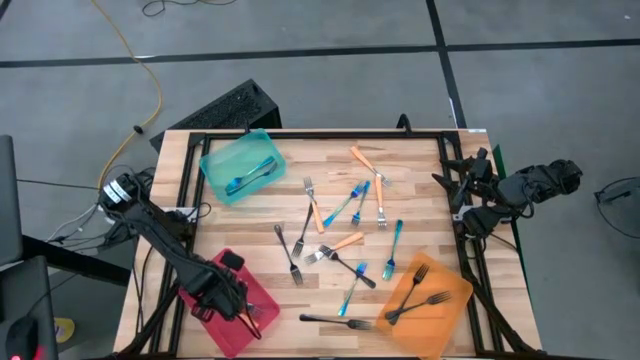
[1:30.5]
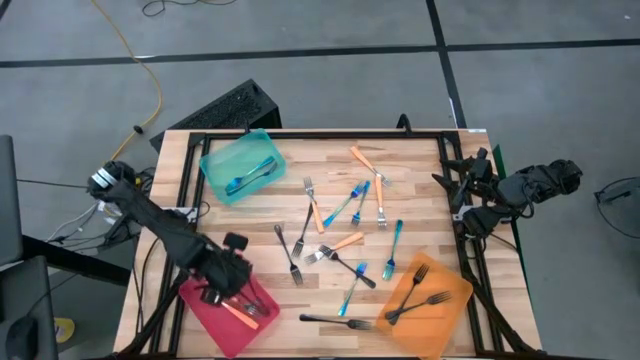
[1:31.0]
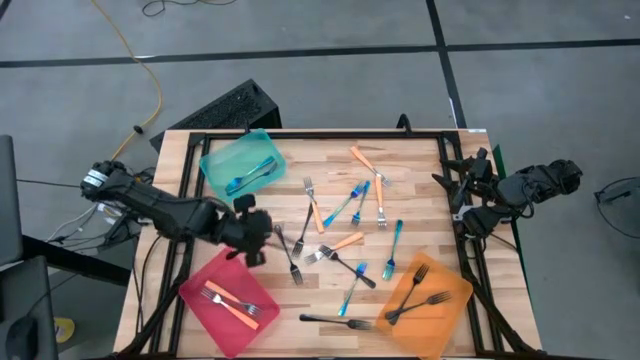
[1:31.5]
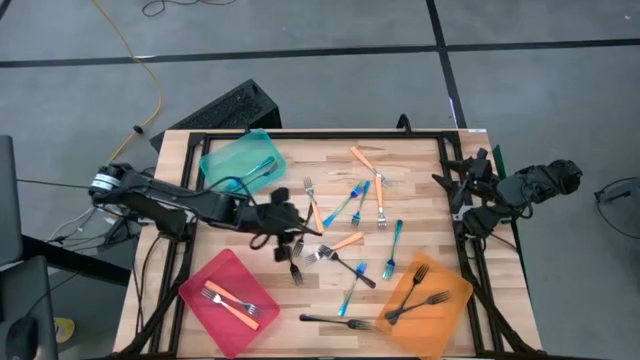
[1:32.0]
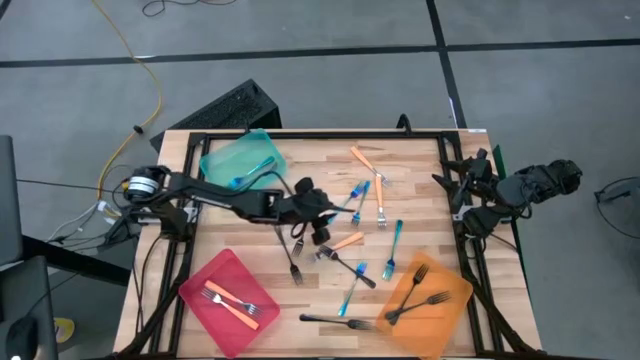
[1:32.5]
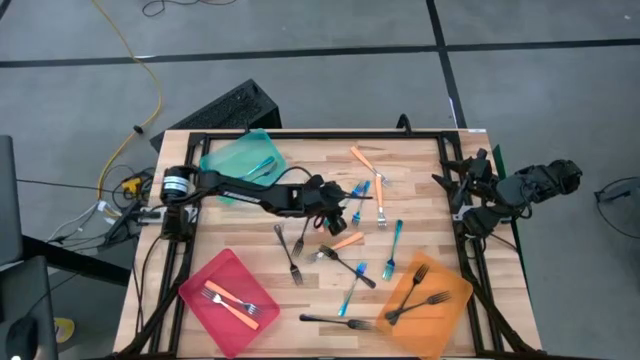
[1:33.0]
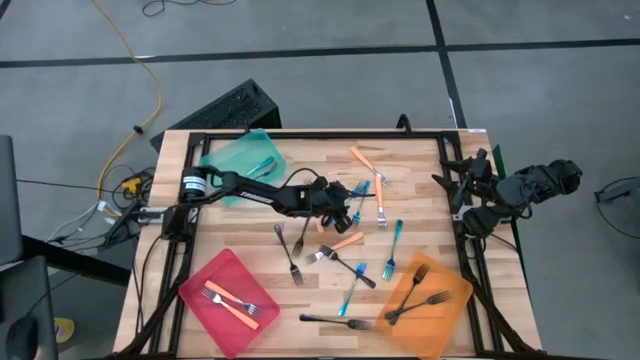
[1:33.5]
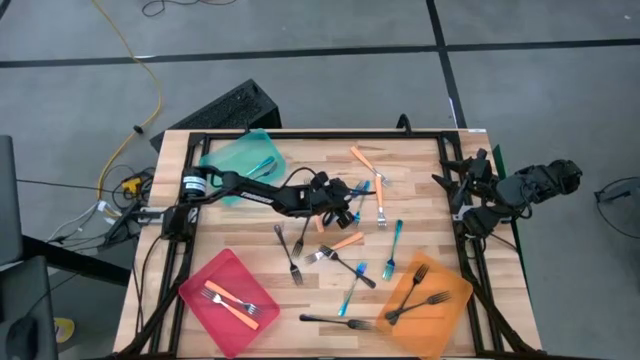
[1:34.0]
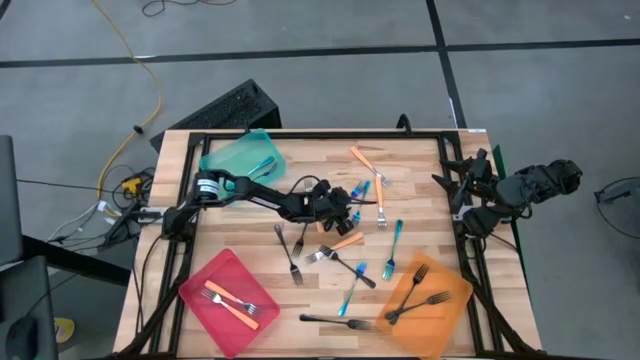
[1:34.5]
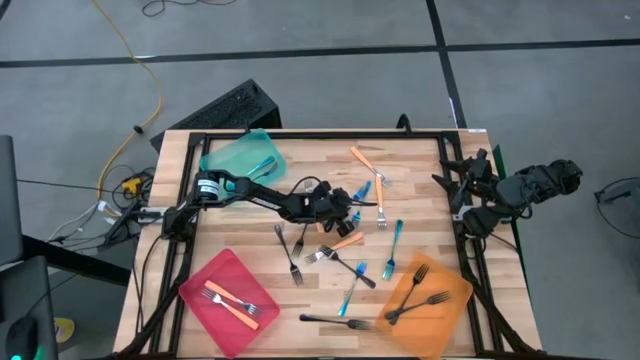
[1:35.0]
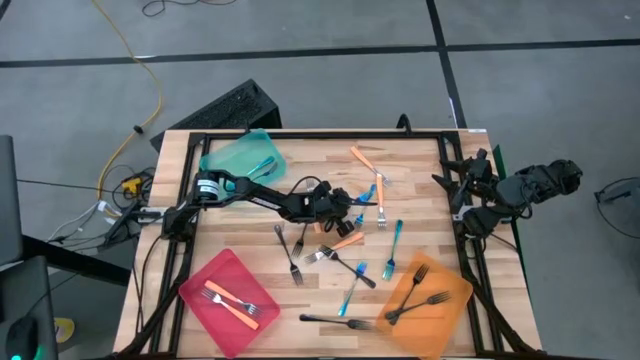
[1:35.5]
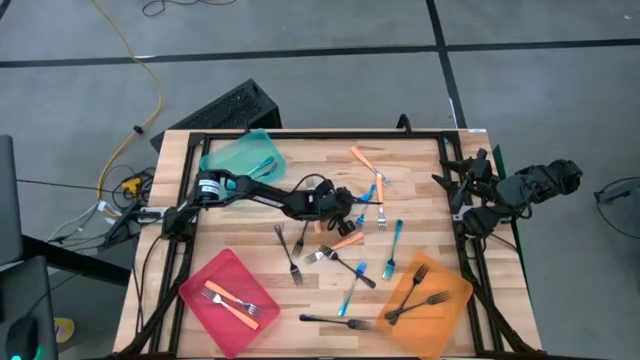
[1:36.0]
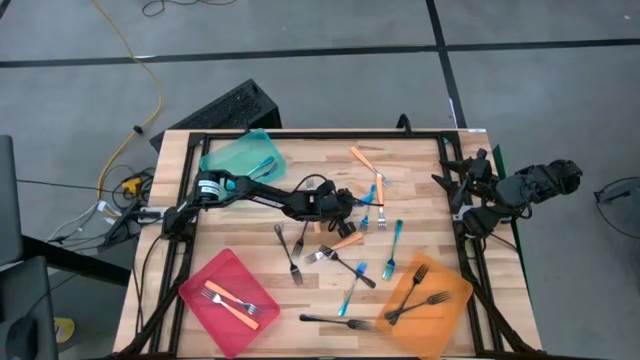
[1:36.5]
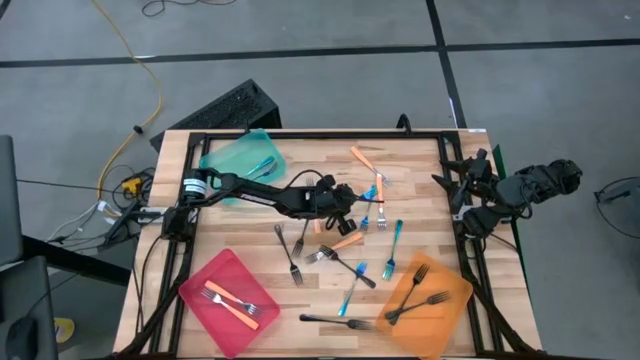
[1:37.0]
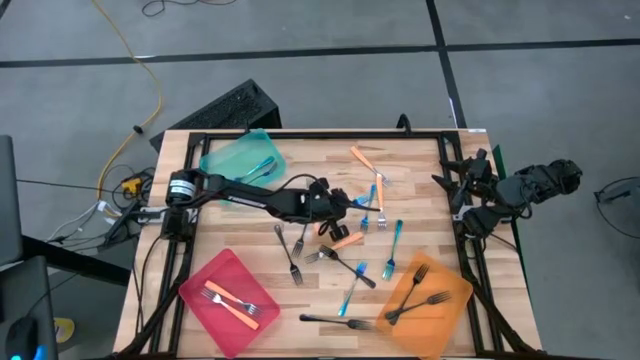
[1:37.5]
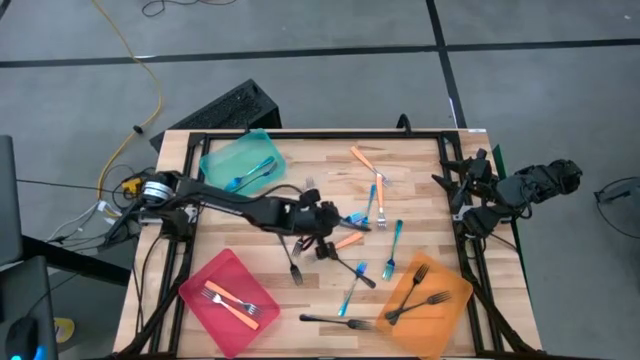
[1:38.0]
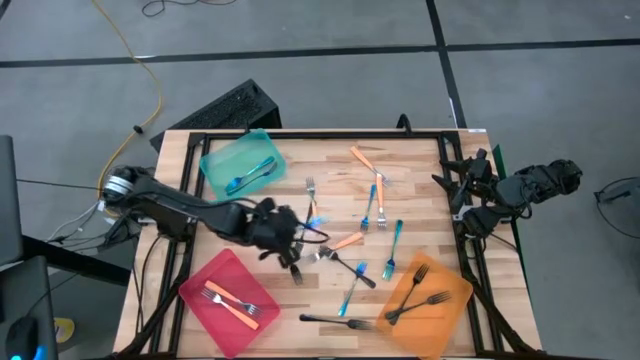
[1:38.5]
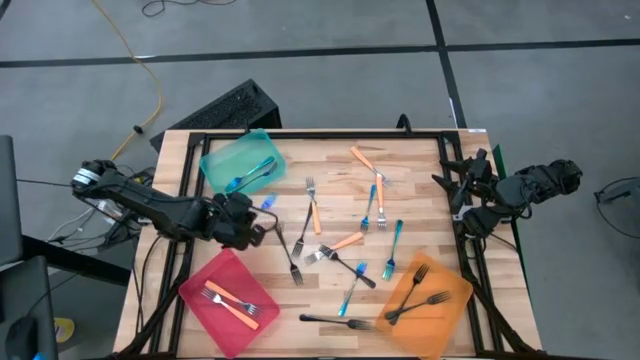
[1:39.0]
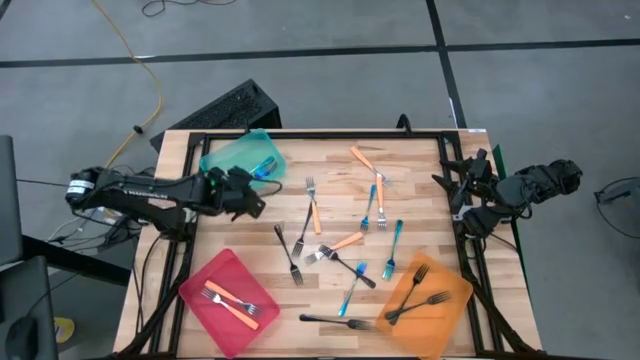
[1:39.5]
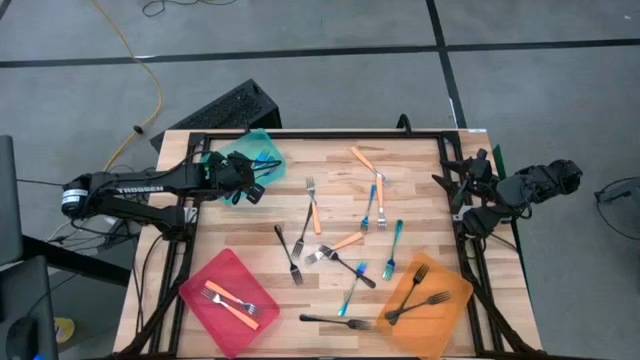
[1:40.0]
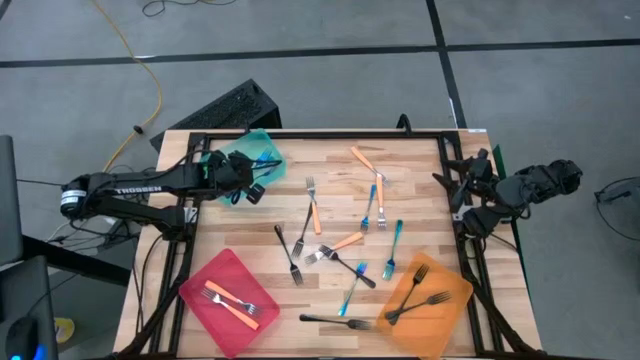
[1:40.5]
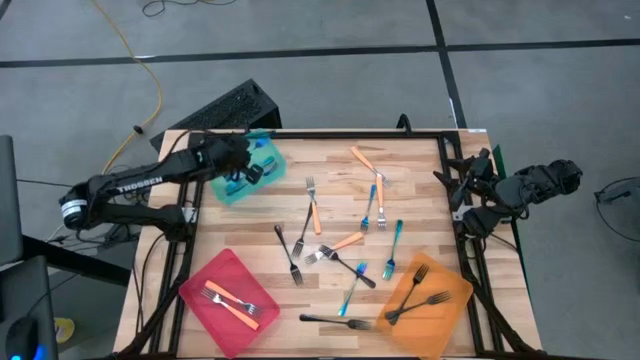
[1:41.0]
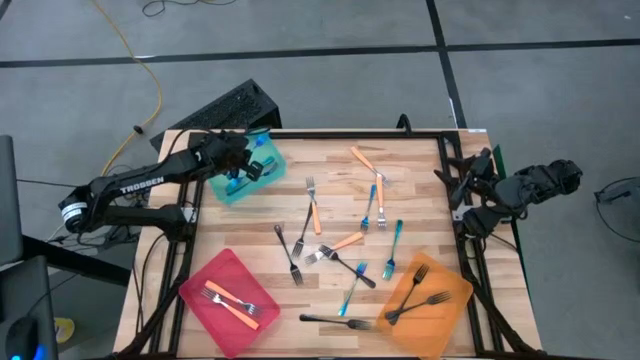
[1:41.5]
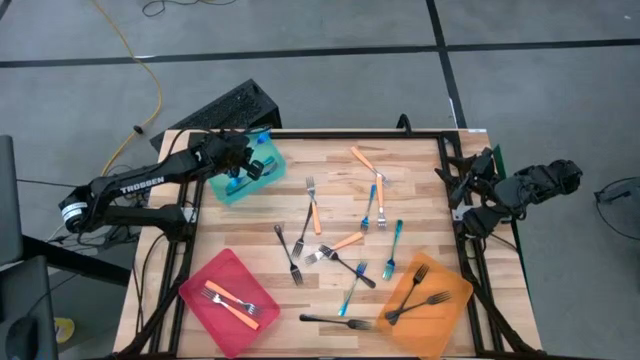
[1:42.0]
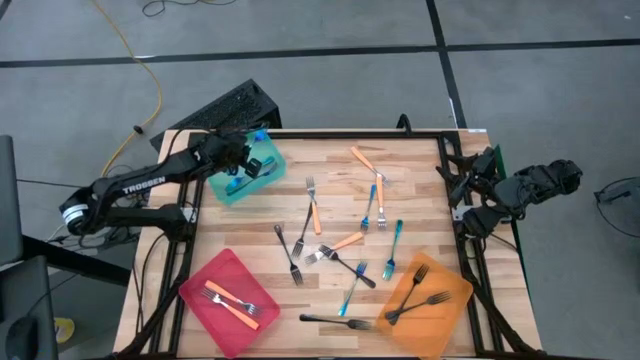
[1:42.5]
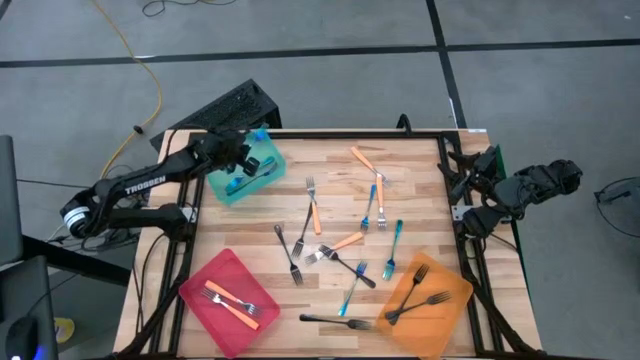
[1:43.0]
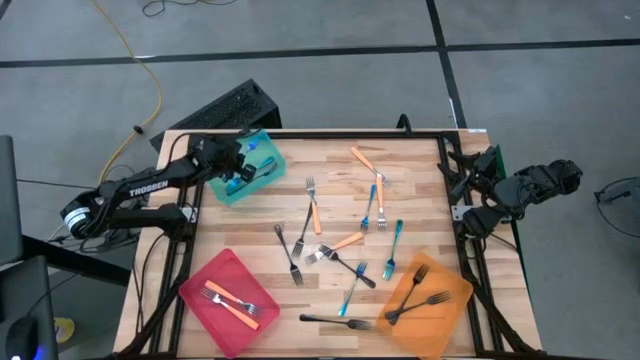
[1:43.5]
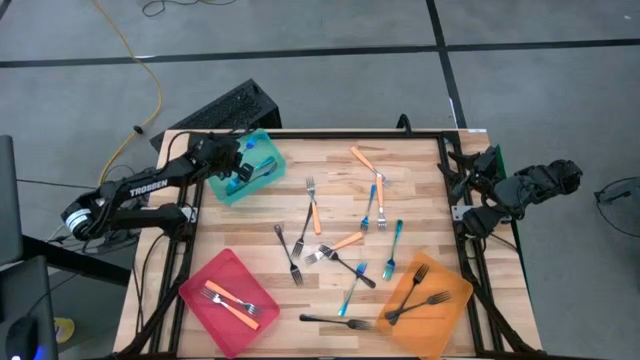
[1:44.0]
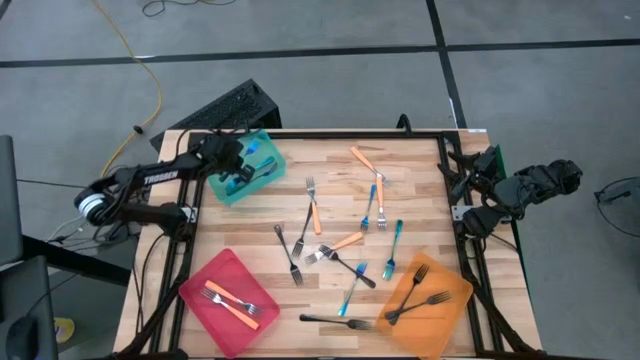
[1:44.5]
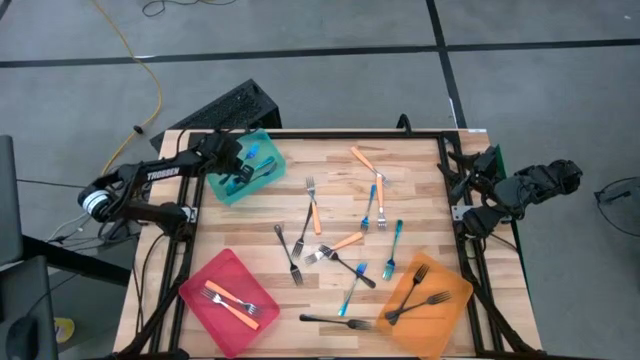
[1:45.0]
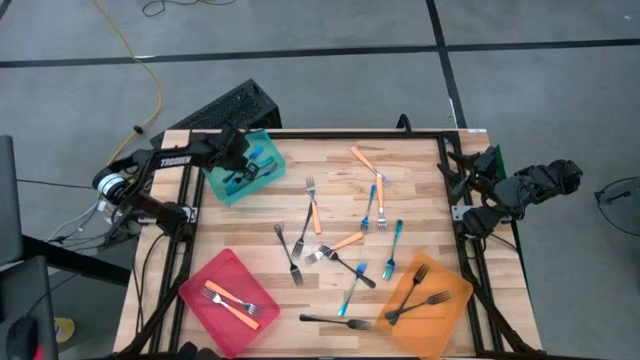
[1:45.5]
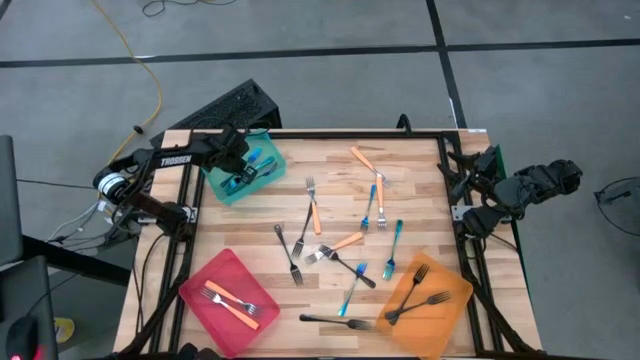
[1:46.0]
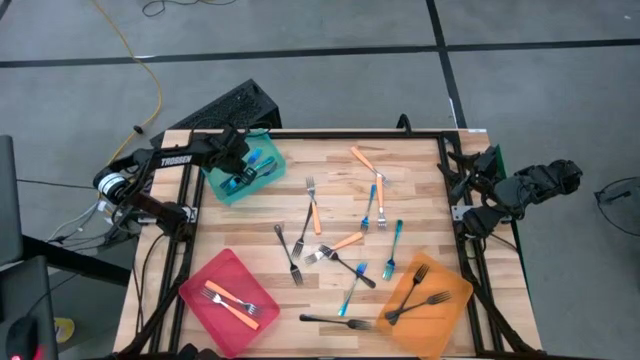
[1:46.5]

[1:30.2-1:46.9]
Task: Sort silverware by color (type)
Put the blue fork into the blue bin

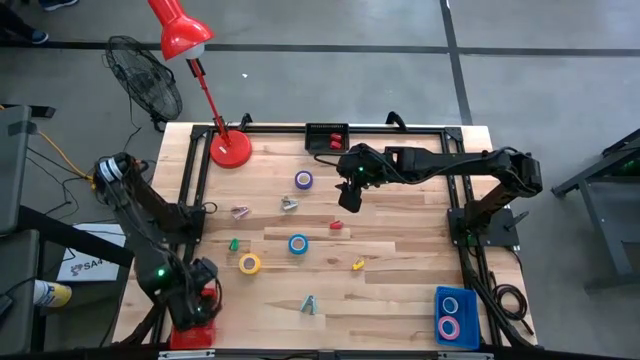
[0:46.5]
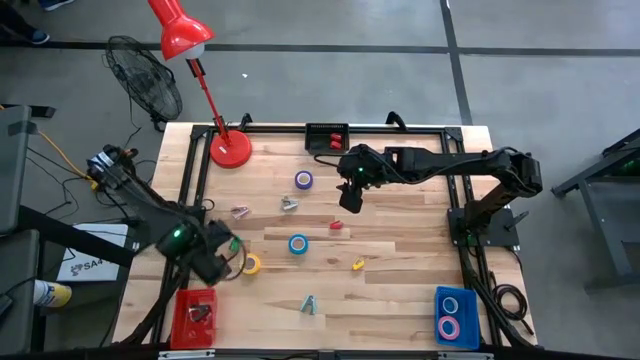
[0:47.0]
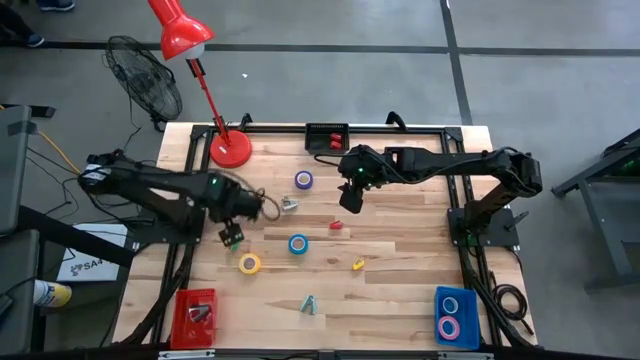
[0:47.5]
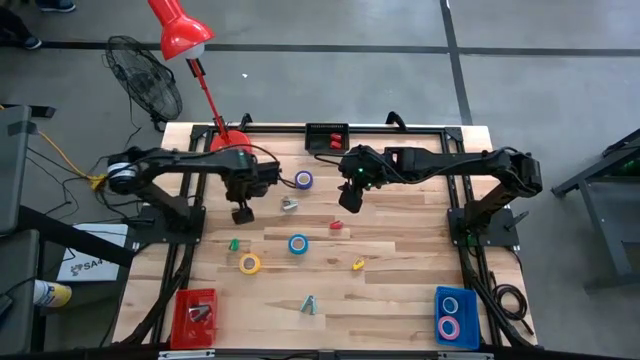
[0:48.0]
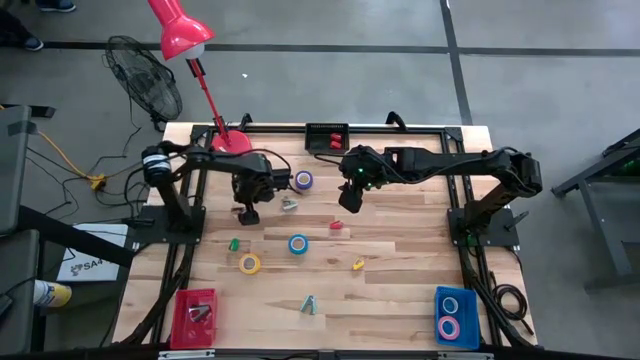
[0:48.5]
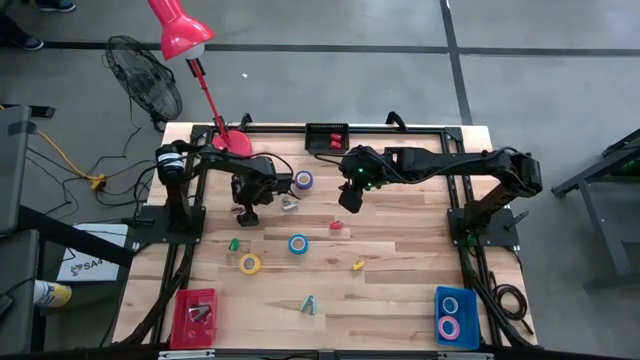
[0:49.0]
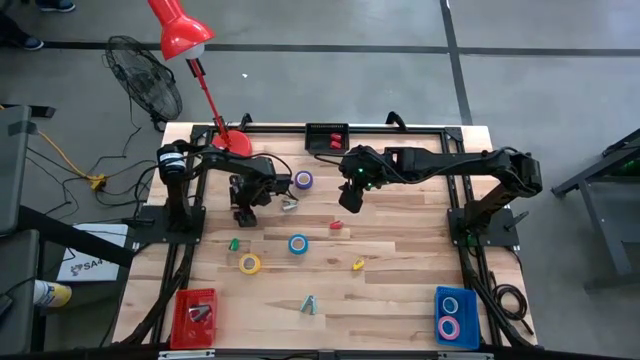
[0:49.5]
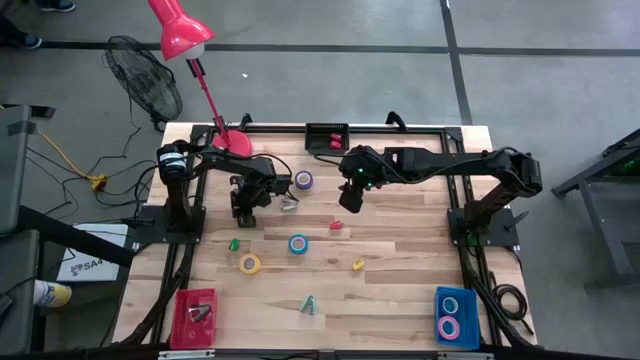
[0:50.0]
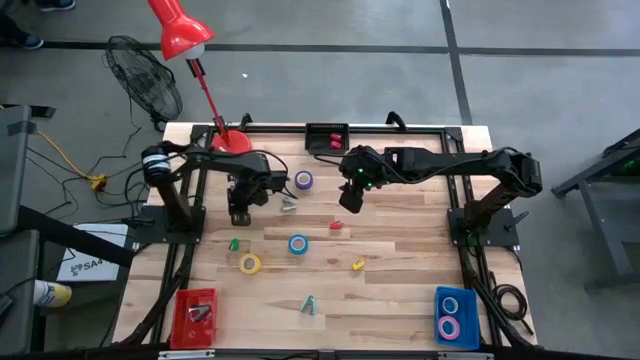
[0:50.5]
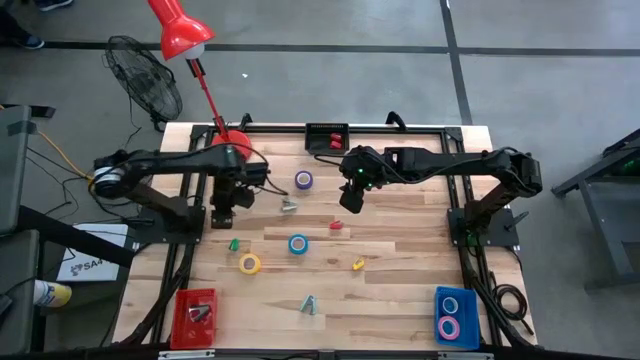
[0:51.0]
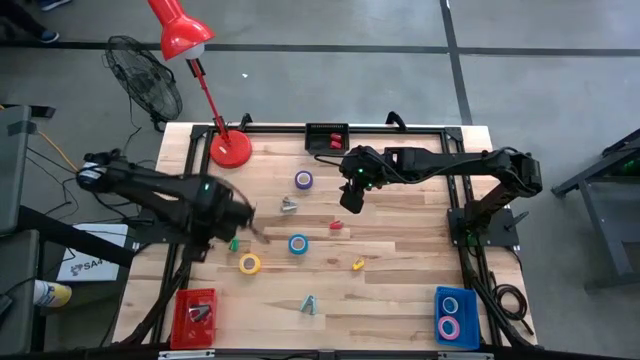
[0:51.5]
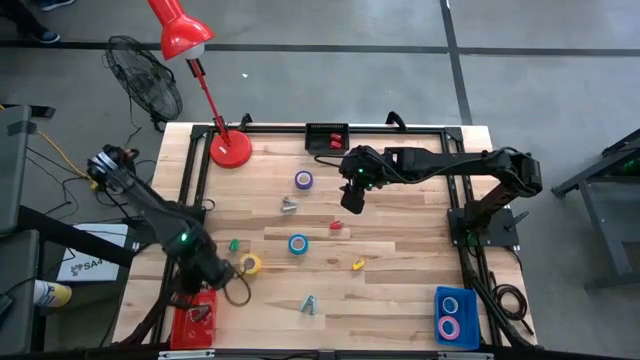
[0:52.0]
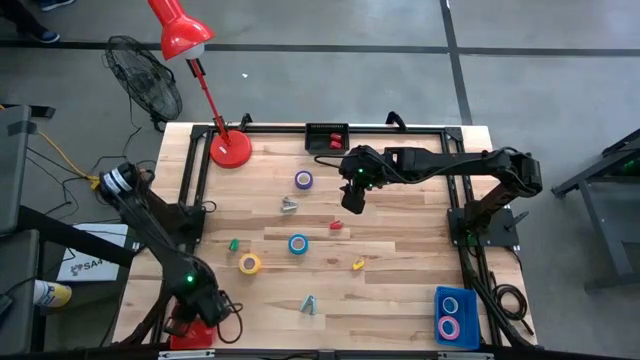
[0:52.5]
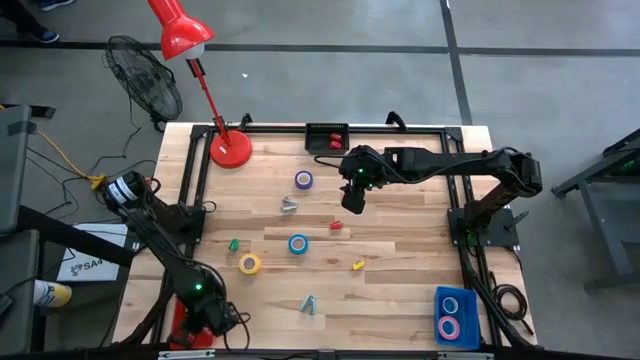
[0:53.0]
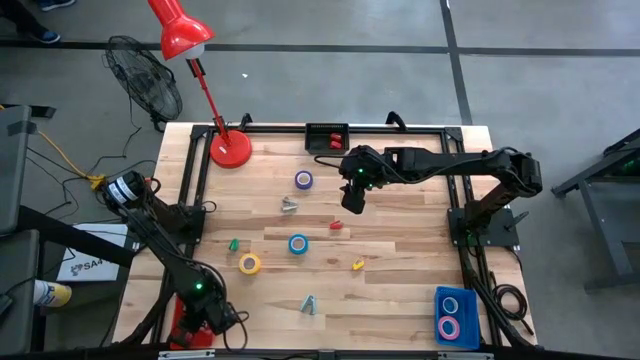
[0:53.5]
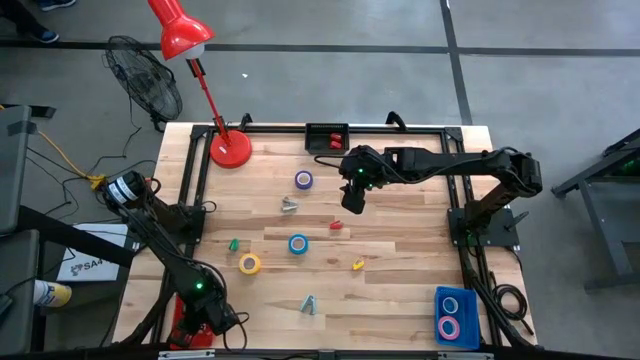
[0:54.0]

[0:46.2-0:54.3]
Task: Pick and place Stapler, Stapler remover, tape
Put the pink staple remover into the red basket
